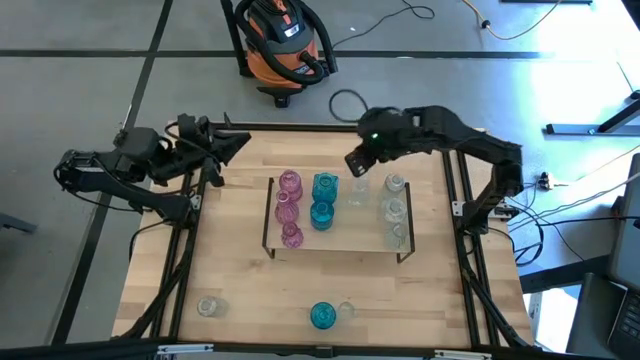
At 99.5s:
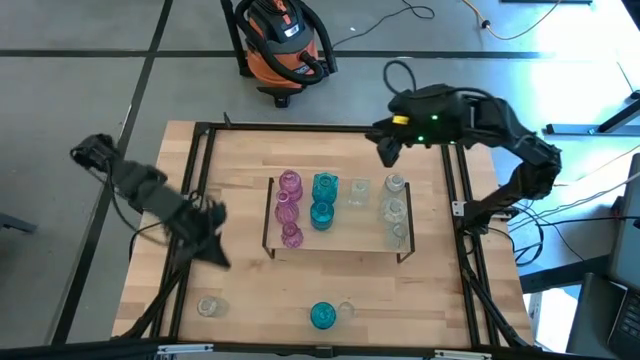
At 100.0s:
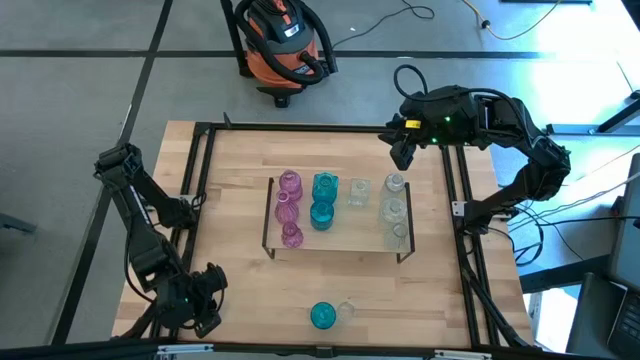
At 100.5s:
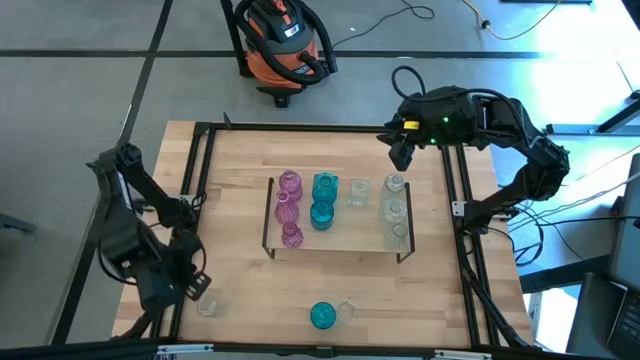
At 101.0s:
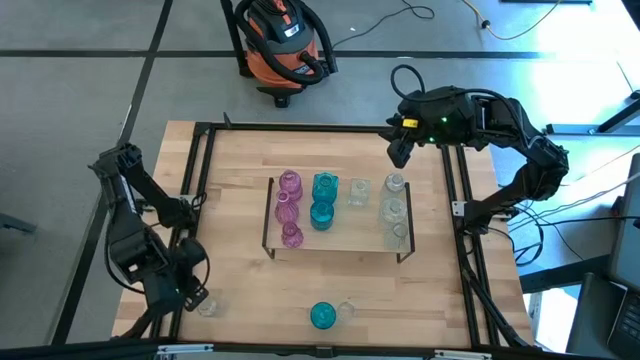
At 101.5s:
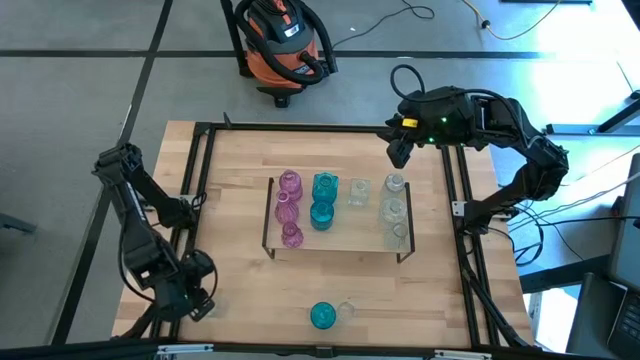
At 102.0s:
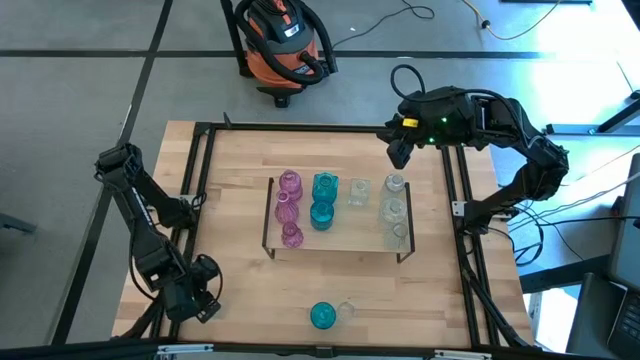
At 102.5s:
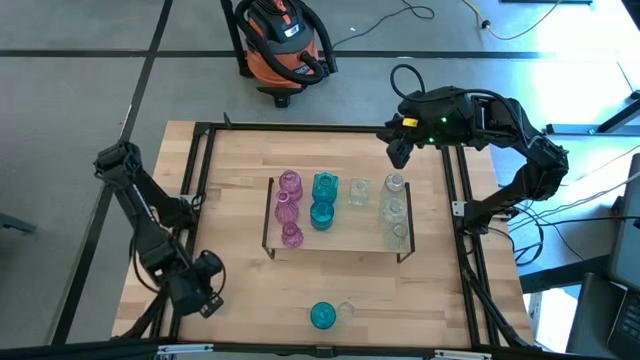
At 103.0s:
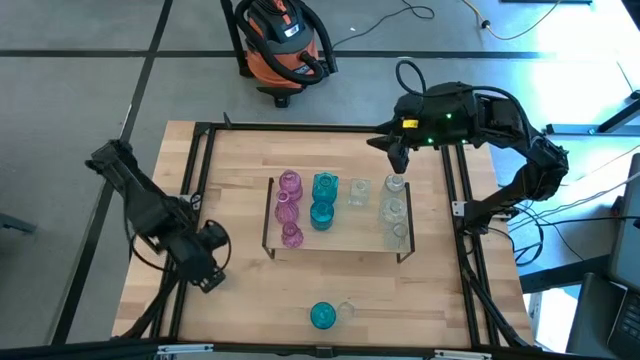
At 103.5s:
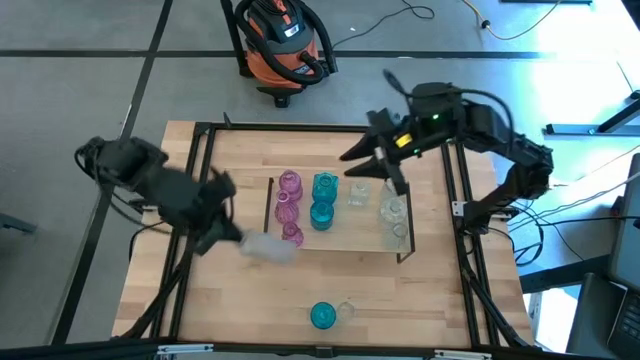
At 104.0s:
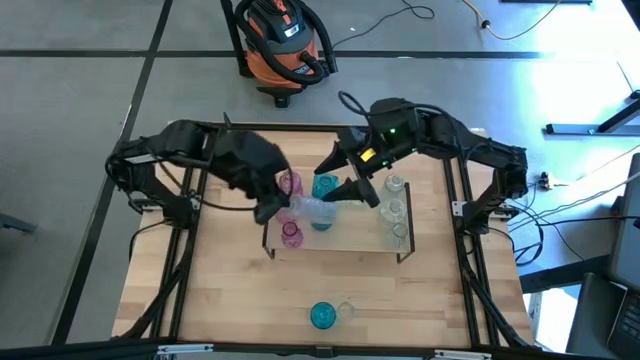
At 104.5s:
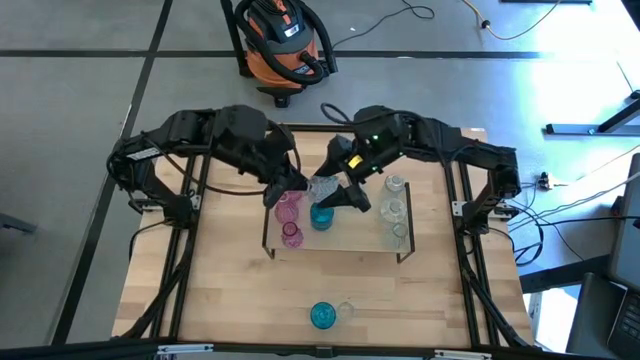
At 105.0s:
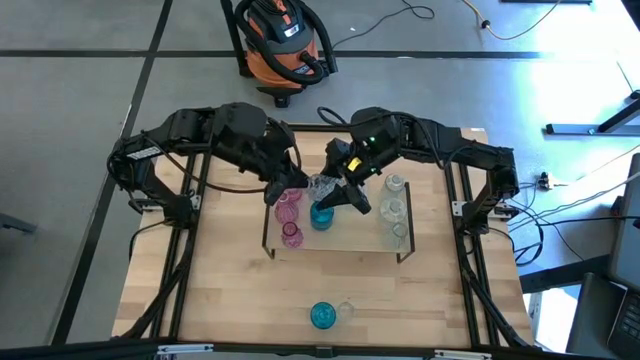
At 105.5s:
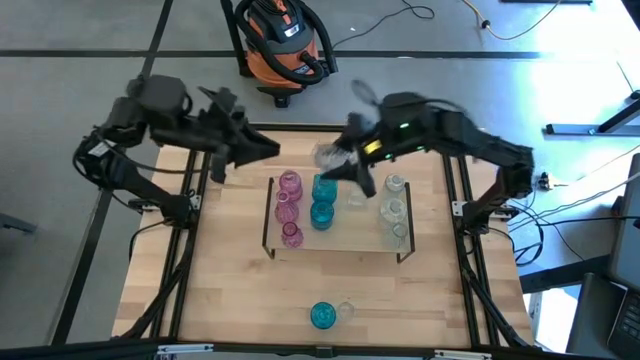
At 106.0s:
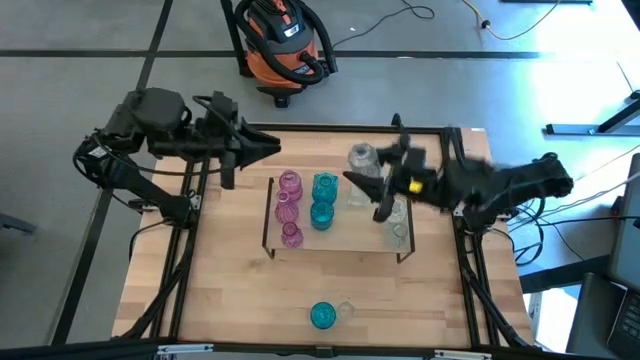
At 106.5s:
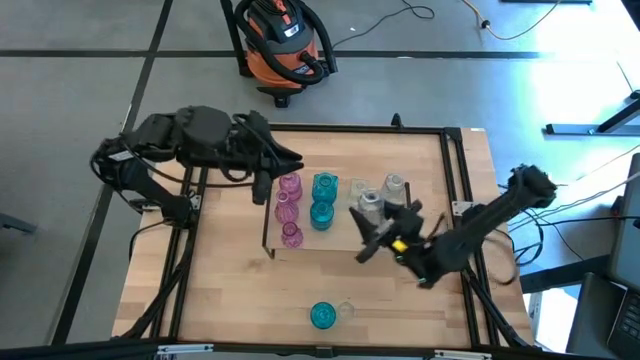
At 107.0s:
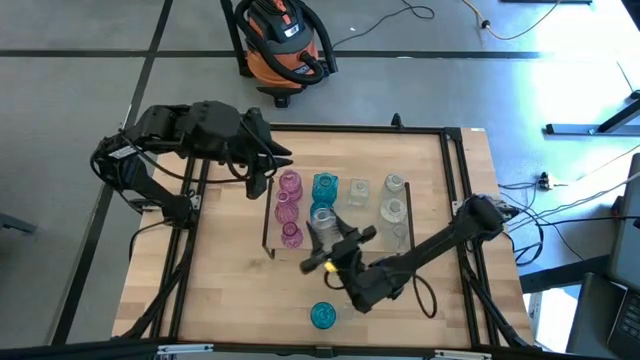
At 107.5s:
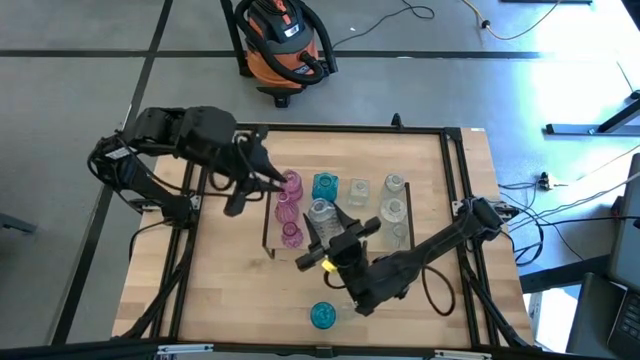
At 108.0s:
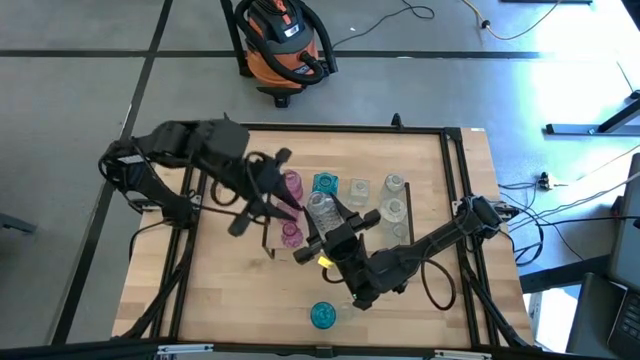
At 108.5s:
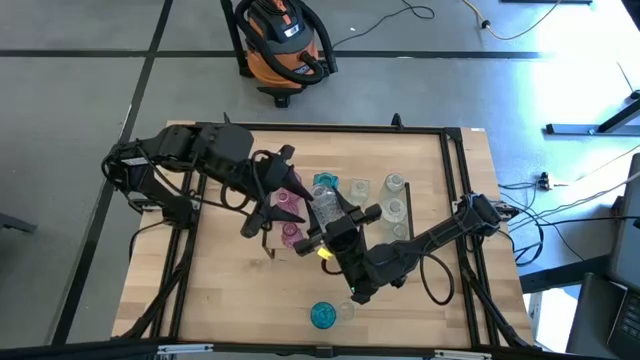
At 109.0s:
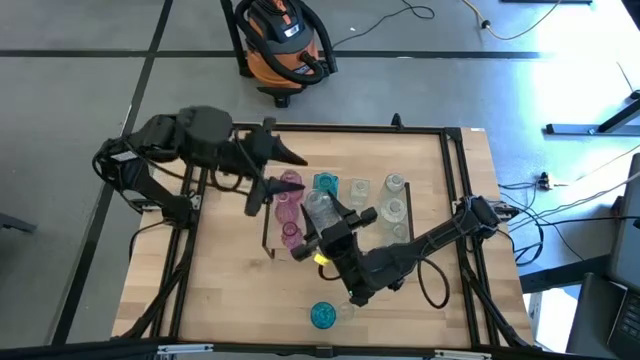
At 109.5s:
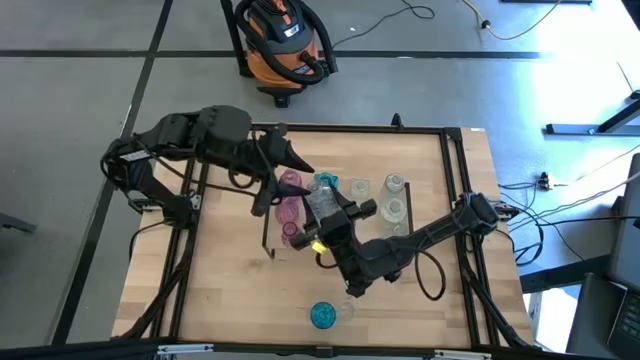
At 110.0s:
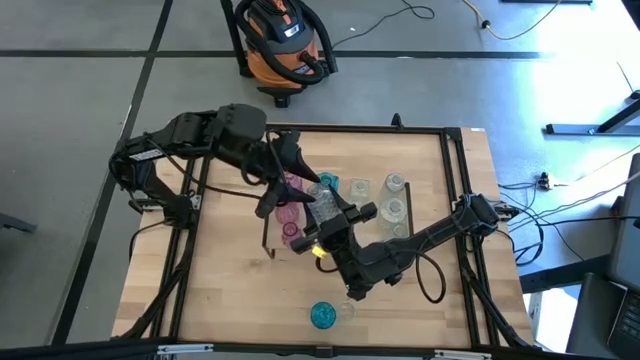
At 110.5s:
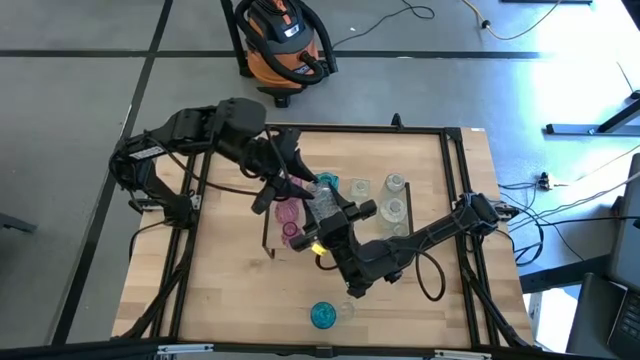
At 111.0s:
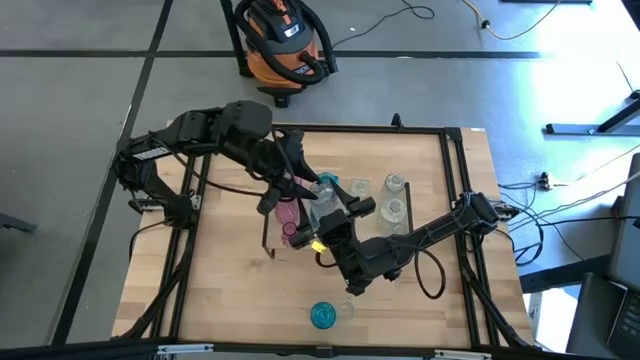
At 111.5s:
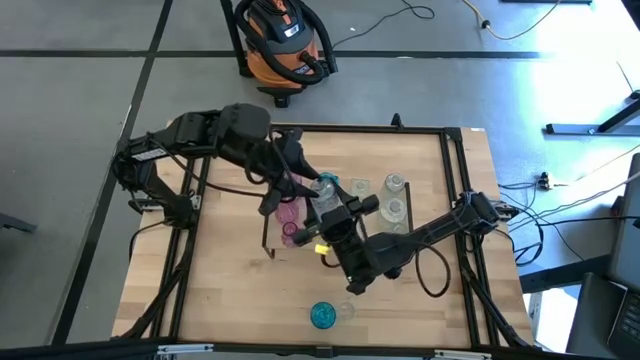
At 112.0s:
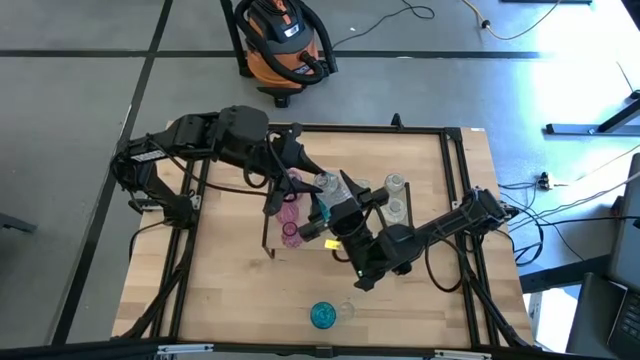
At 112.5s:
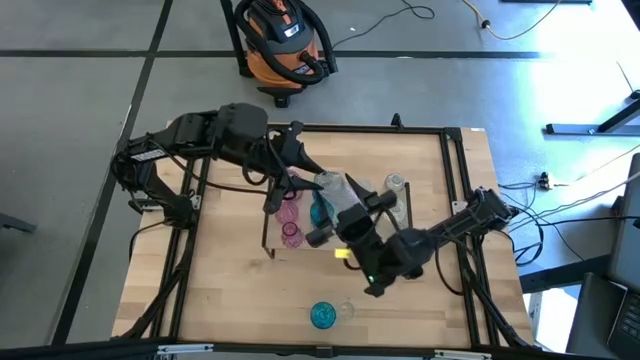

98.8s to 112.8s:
Task: sort vases onto shelf
Put the transparent vase on the shelf aligned with the other transparent vase

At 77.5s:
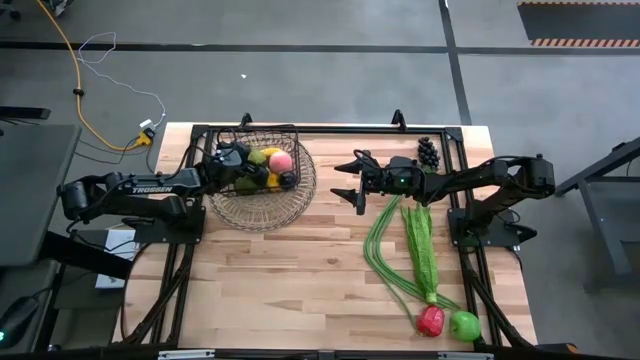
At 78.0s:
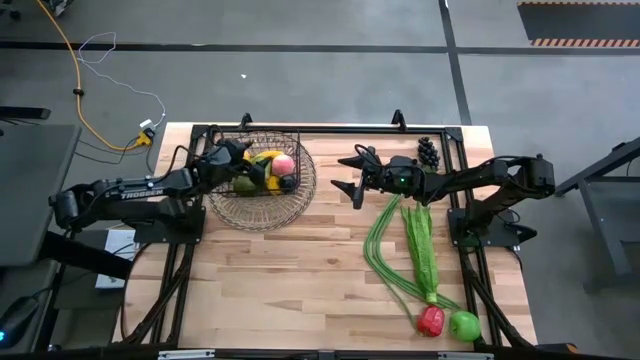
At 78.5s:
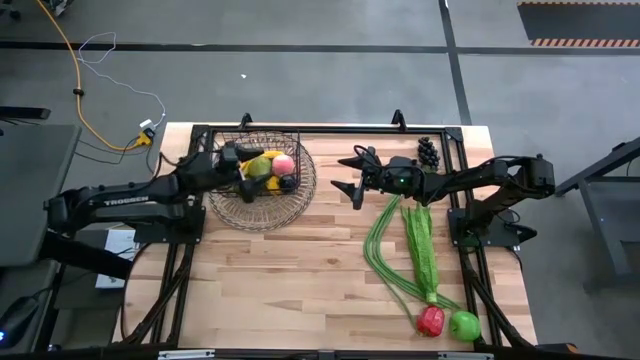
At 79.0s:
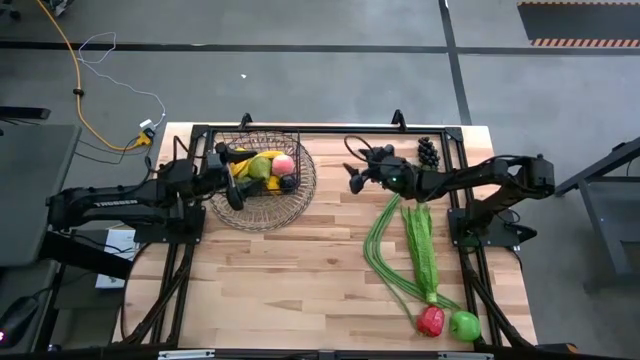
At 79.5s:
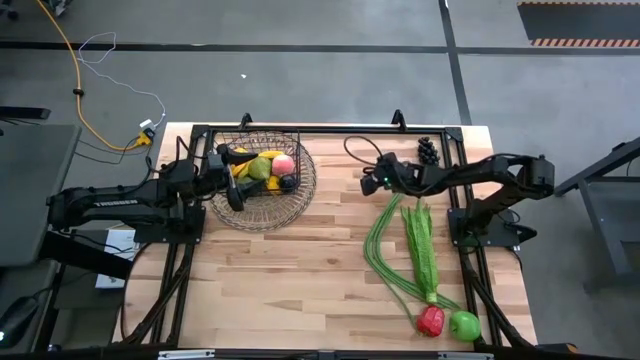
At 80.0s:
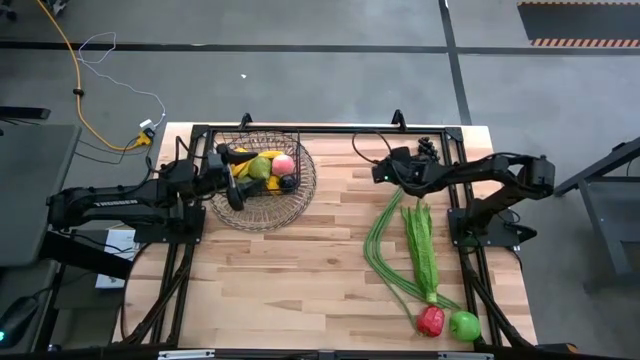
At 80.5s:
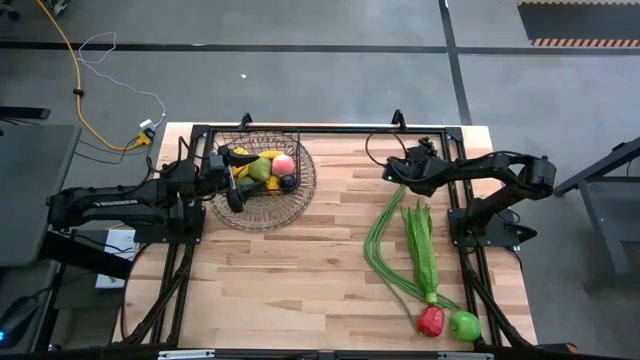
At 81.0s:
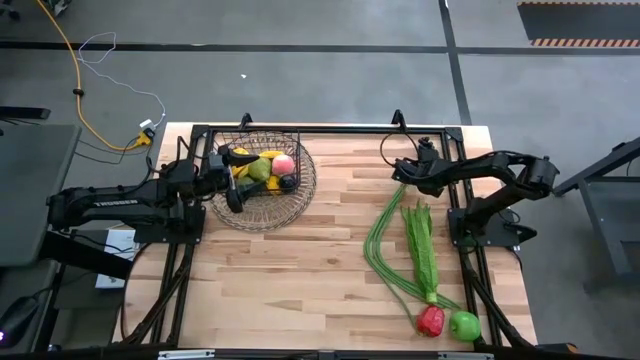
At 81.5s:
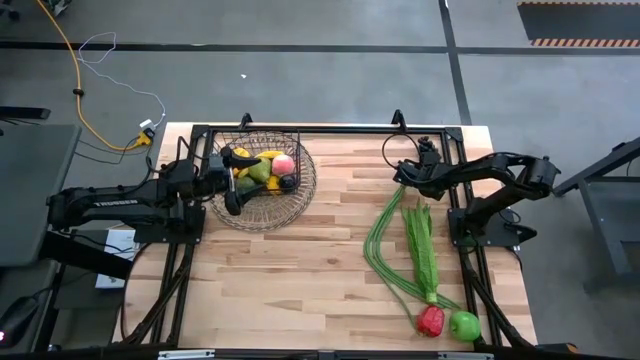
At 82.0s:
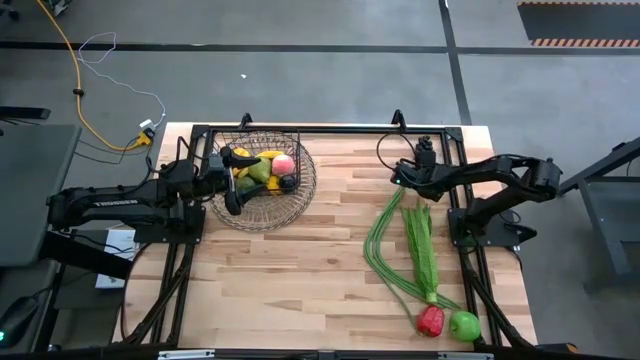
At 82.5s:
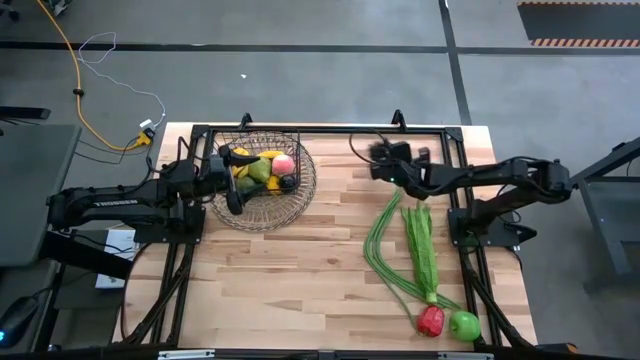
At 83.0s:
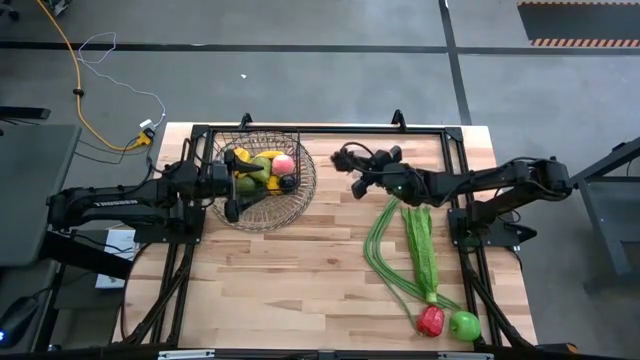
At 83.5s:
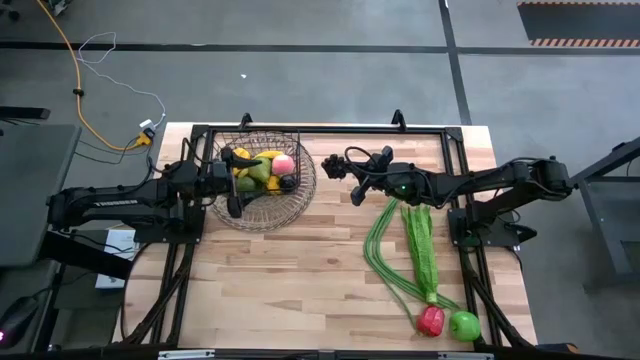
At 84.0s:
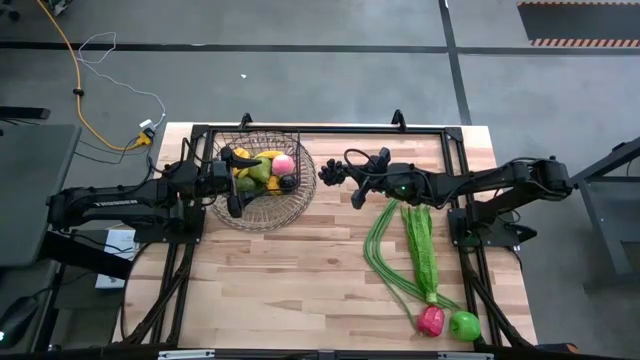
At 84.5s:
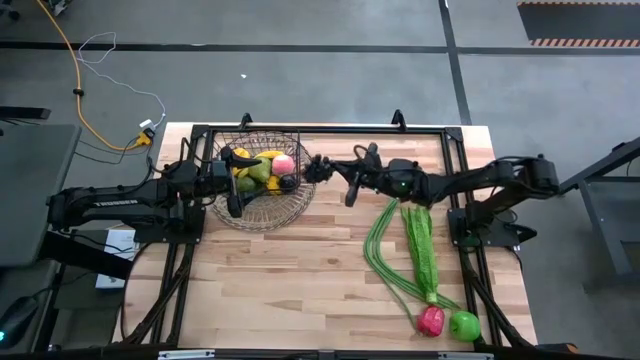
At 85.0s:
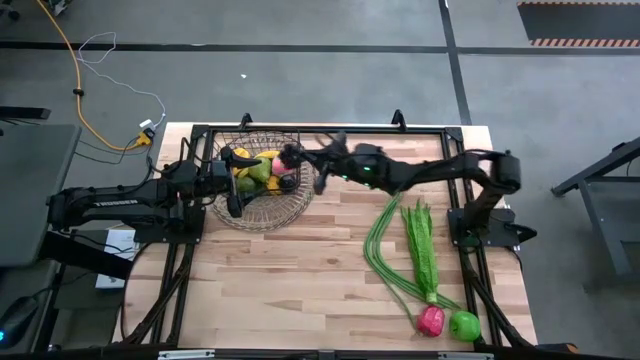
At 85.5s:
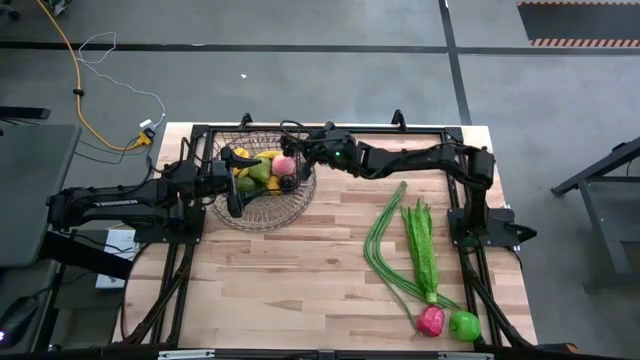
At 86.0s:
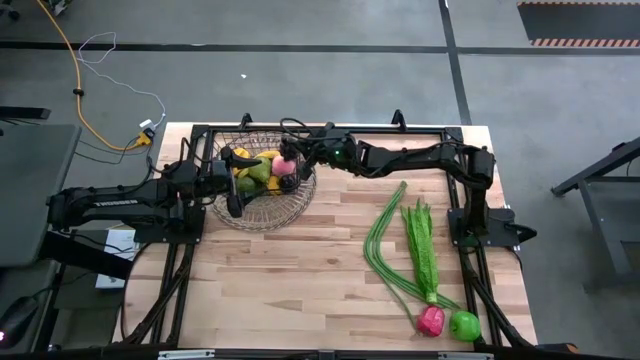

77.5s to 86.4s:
Task: Build produce basket
Put the black grapes into the wire basket
